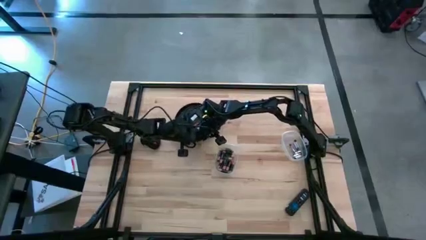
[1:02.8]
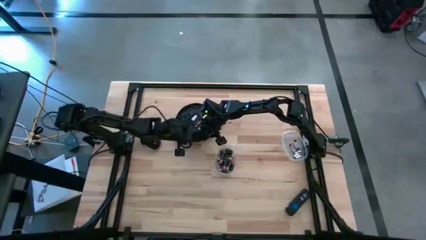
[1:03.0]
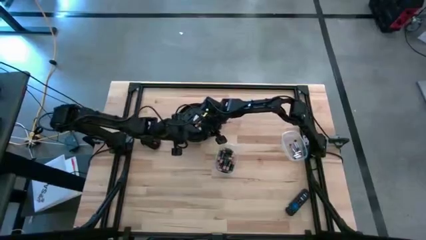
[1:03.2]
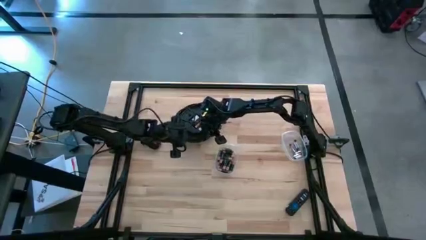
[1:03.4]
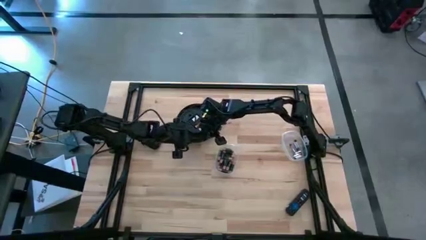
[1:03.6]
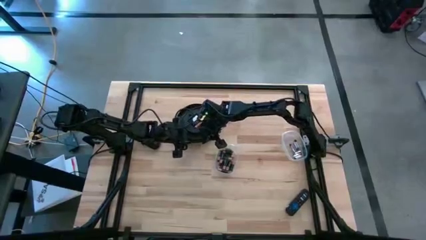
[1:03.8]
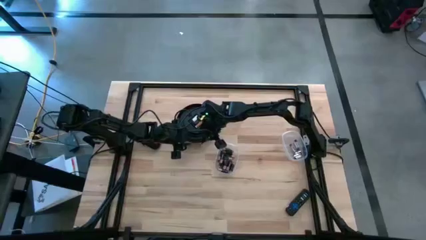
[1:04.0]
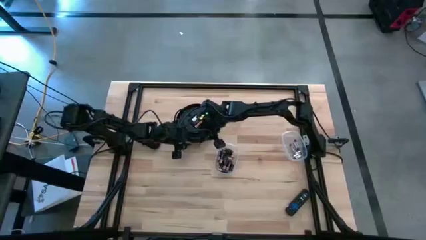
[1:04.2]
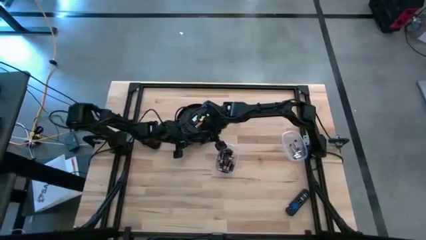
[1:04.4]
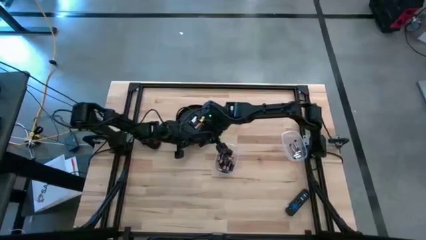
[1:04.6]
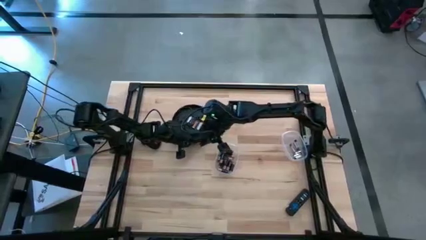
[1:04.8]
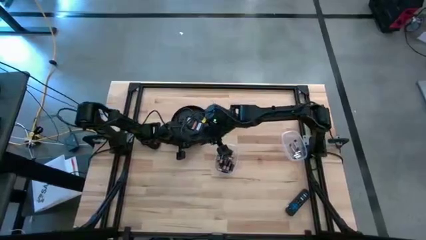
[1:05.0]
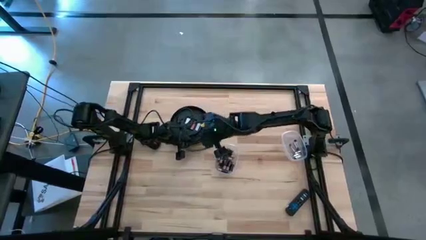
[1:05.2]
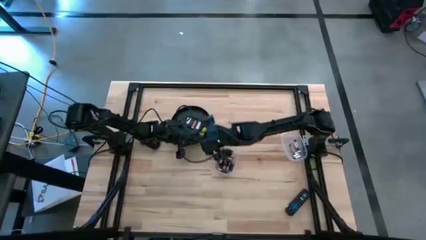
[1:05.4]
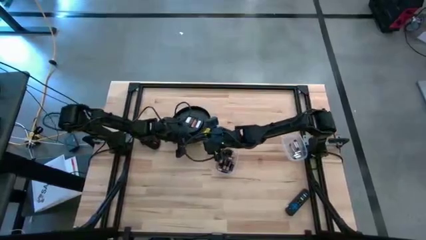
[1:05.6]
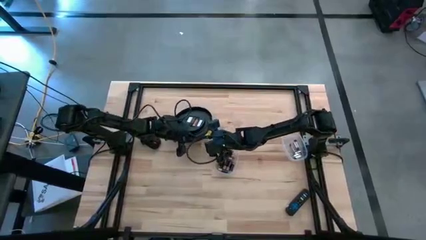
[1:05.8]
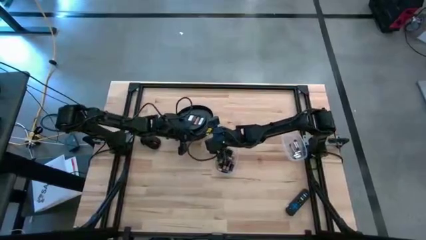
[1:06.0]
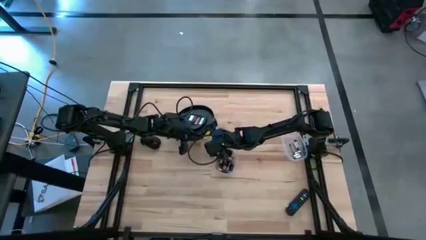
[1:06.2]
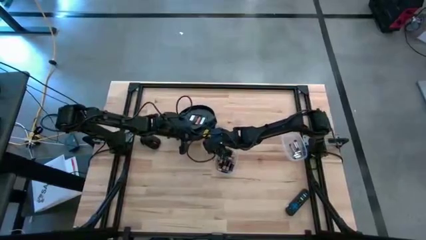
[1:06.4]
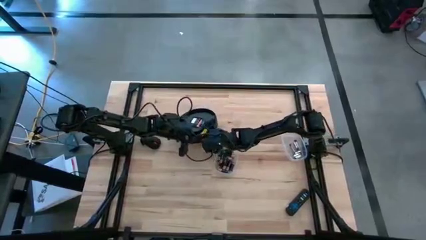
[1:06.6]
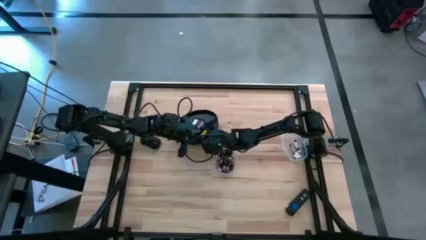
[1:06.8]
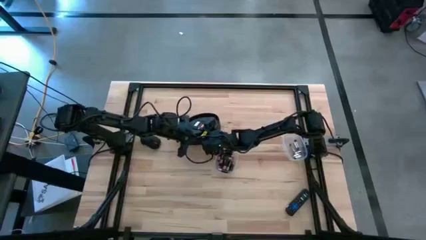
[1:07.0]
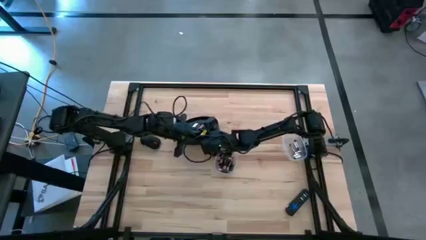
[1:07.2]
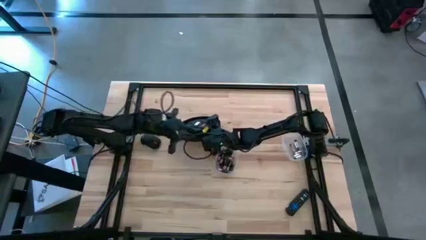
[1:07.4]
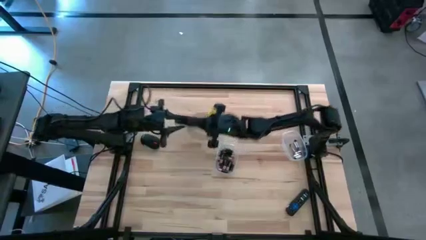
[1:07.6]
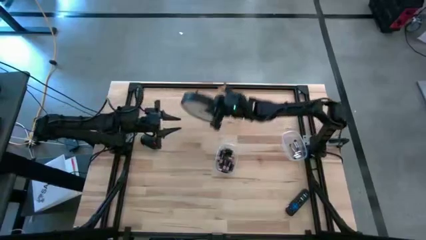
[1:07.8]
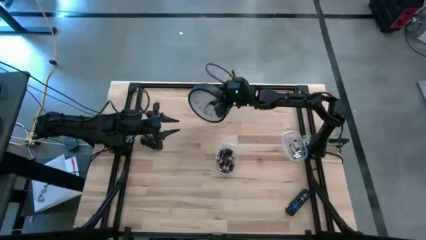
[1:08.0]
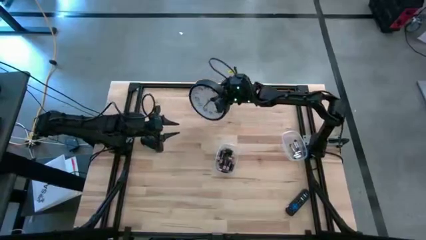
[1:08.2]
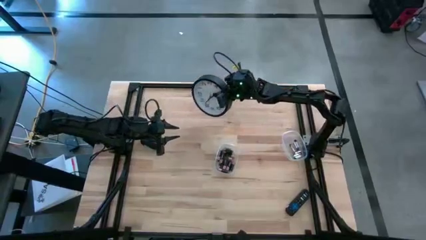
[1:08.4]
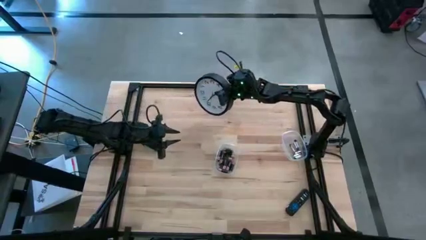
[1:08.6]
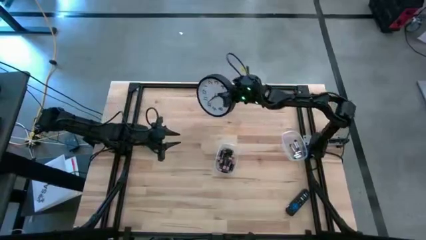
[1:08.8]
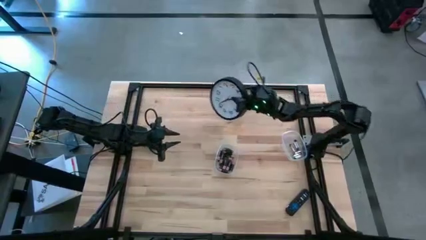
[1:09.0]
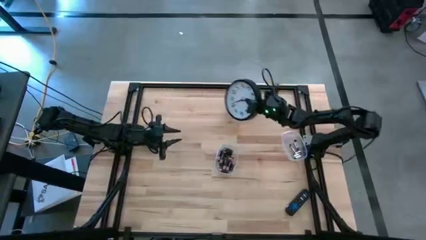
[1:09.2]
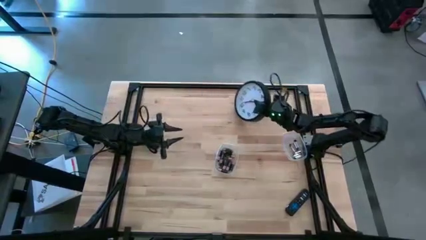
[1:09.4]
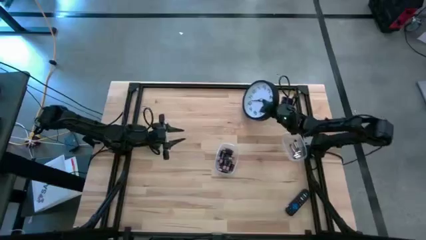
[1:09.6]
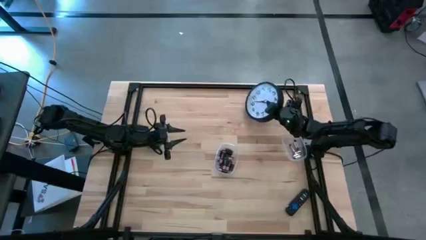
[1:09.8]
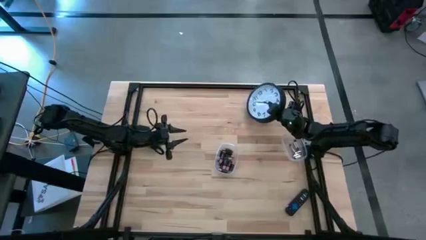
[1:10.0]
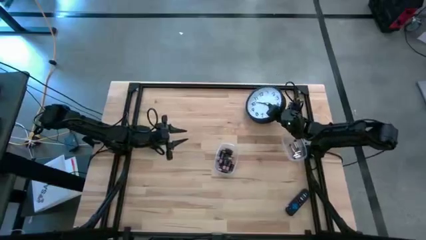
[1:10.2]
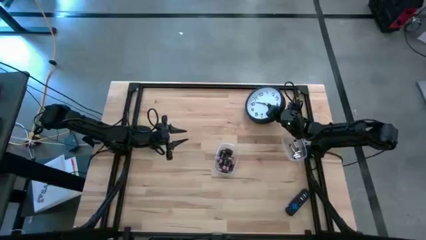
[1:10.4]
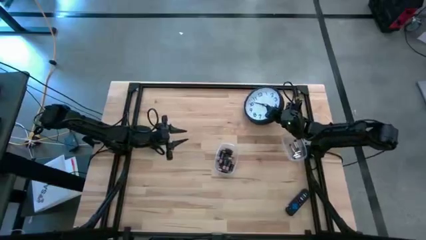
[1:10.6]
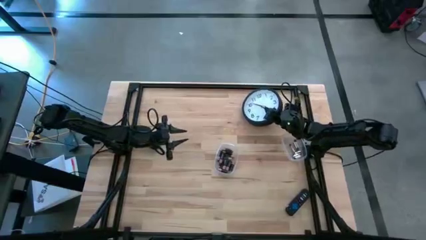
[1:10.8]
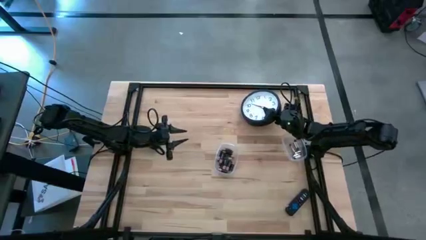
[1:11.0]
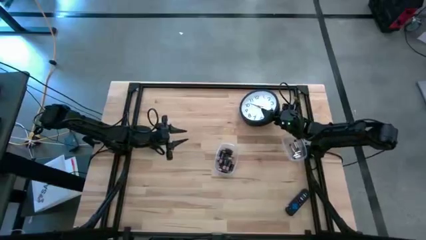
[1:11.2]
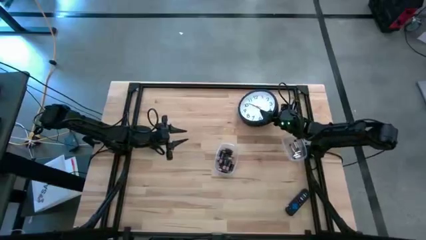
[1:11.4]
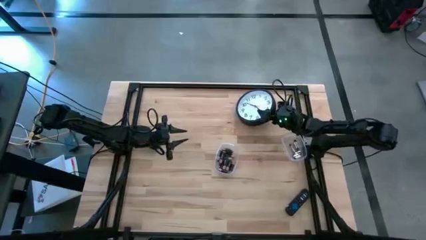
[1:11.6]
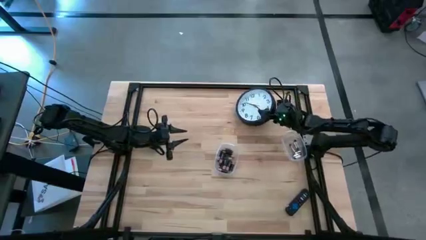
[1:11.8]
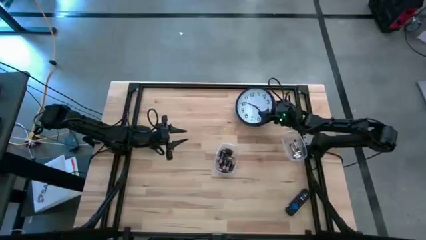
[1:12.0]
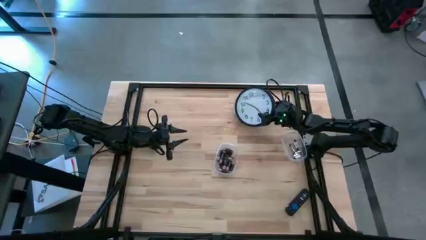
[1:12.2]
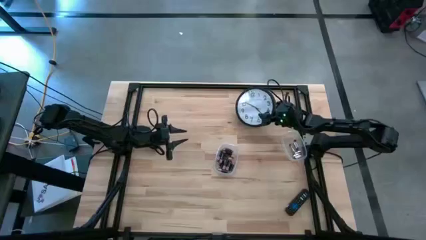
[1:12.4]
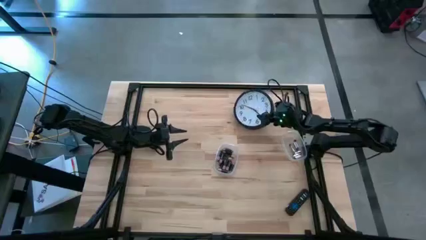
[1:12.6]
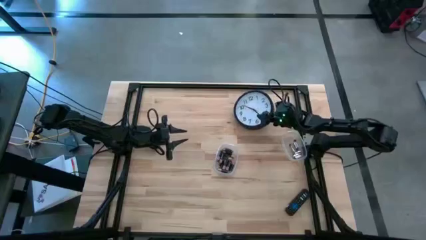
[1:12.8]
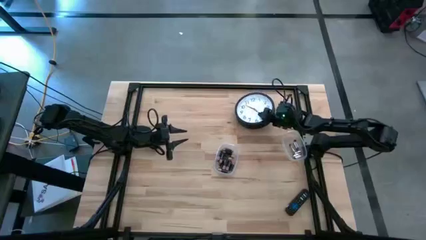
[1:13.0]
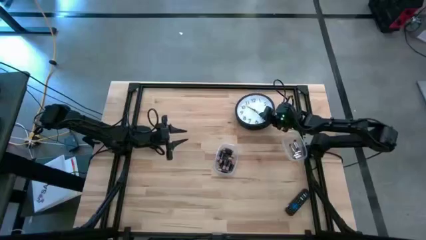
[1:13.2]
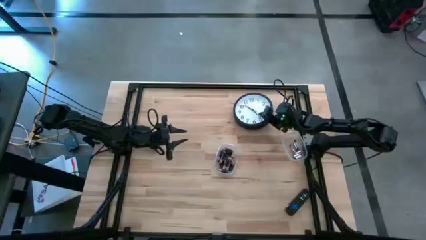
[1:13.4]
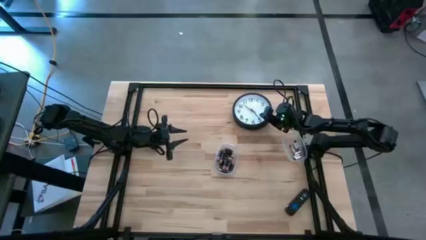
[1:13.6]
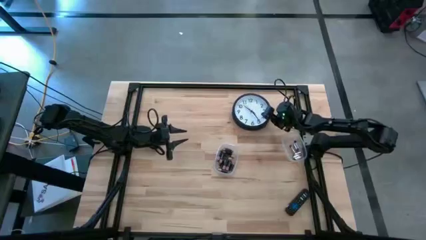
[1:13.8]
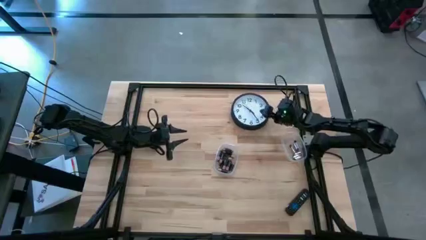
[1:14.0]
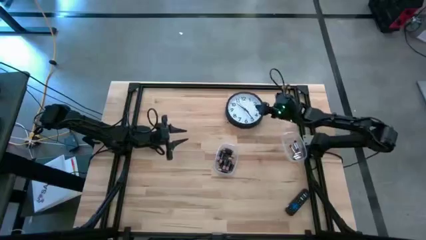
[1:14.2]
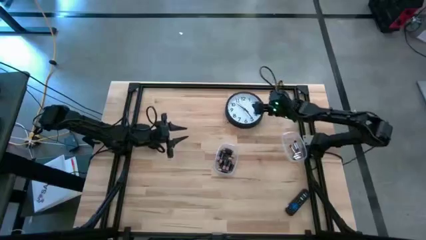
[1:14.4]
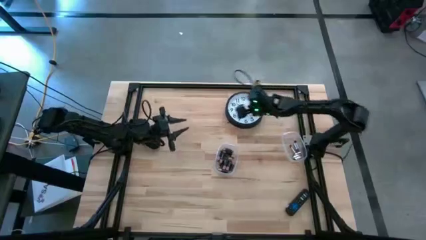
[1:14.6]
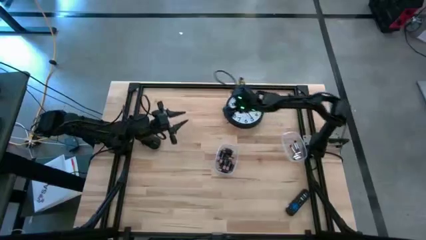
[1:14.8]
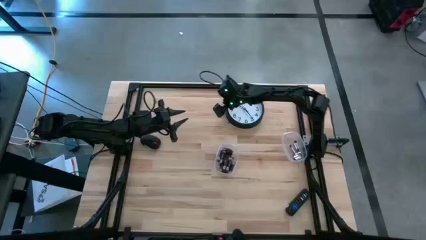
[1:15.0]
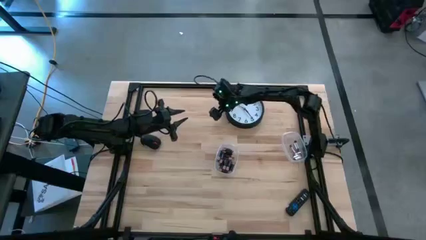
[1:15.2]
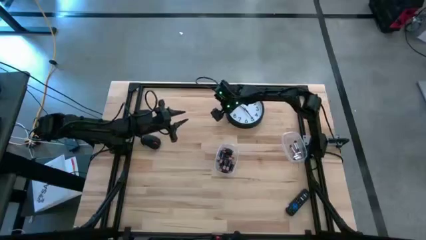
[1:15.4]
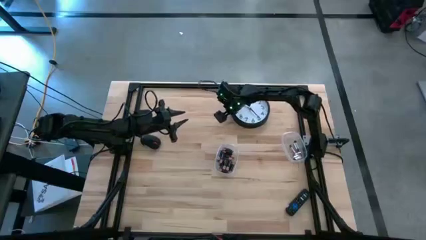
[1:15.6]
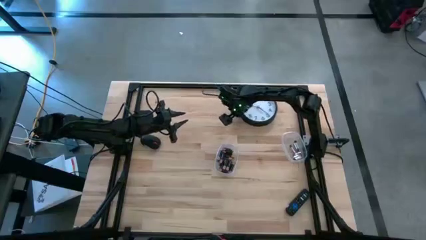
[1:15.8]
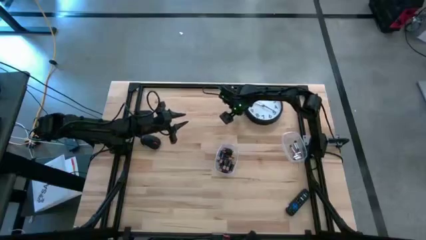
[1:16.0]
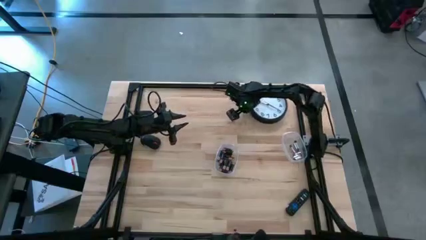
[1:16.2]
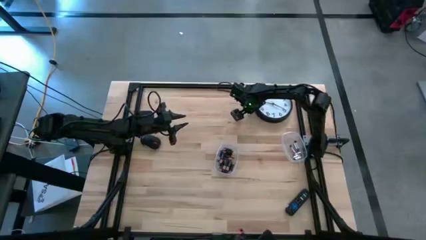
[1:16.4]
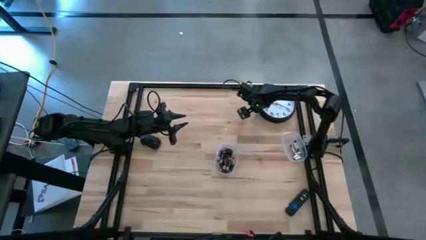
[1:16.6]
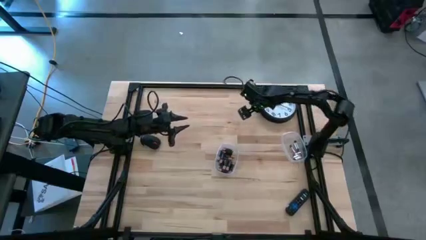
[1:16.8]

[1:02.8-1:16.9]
Task: Insert battery
Move the wall clock

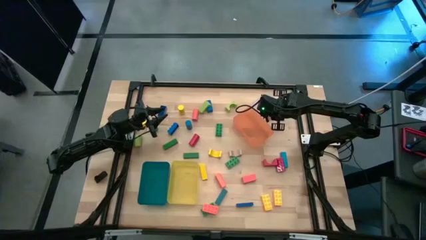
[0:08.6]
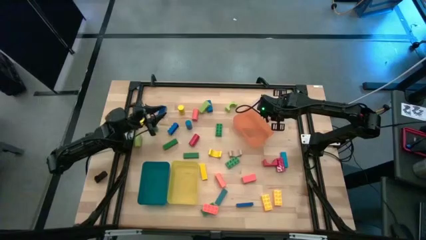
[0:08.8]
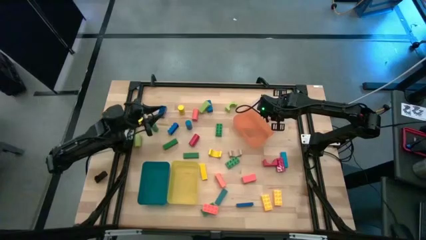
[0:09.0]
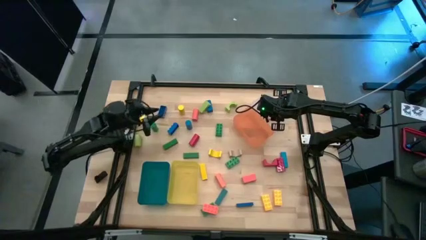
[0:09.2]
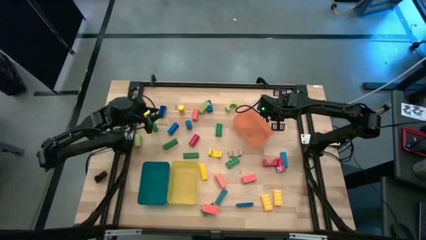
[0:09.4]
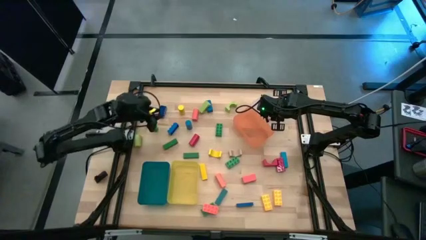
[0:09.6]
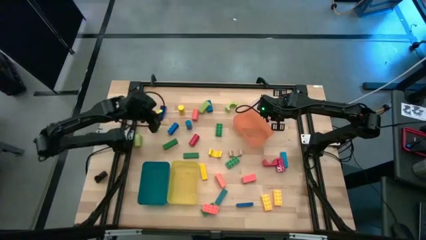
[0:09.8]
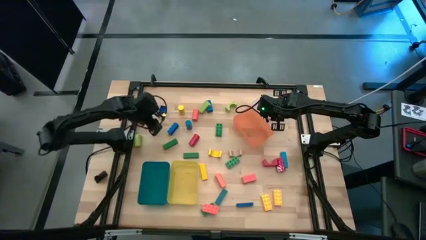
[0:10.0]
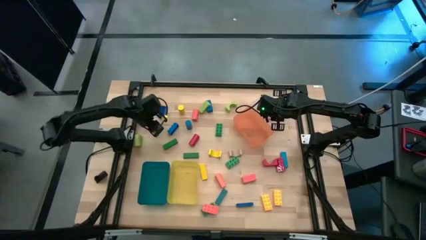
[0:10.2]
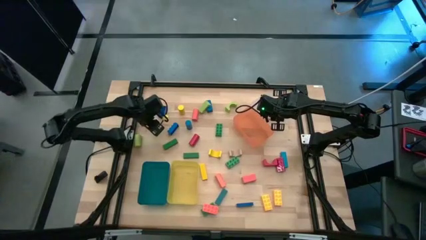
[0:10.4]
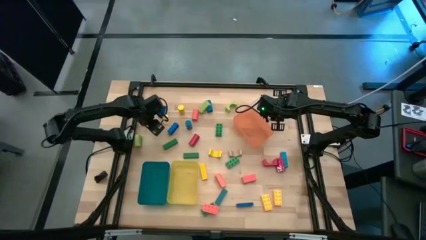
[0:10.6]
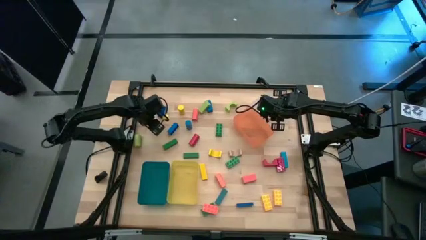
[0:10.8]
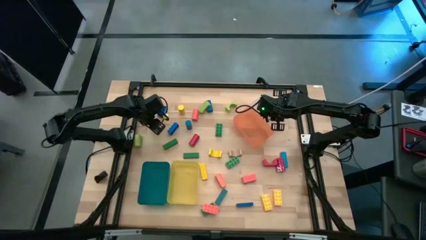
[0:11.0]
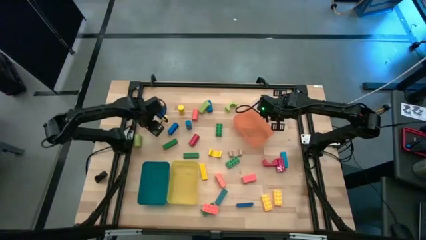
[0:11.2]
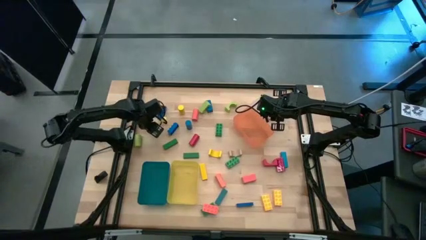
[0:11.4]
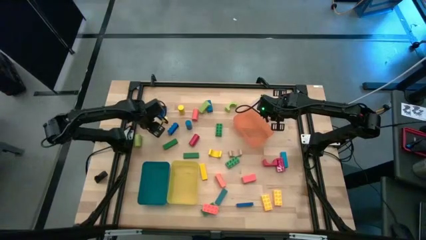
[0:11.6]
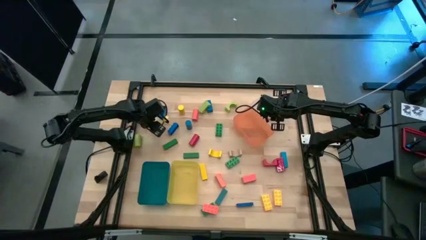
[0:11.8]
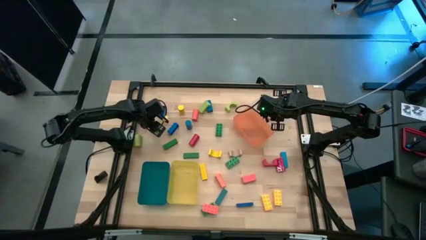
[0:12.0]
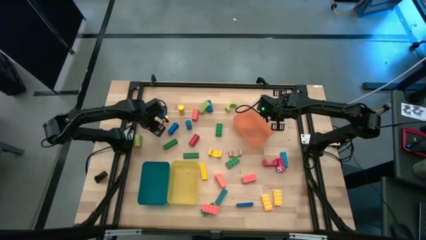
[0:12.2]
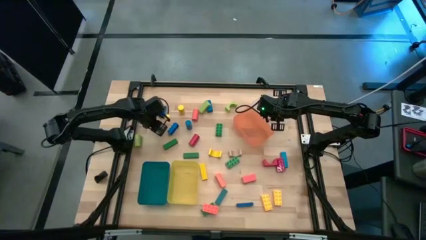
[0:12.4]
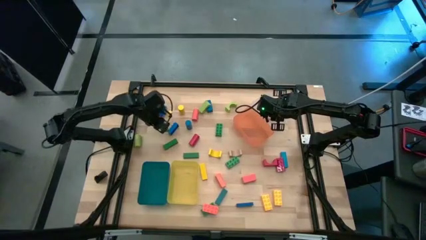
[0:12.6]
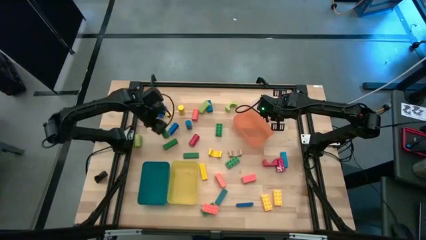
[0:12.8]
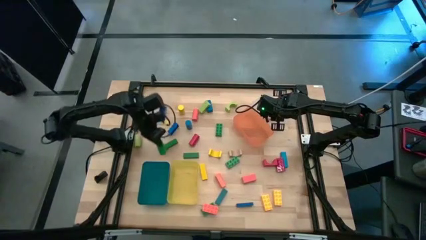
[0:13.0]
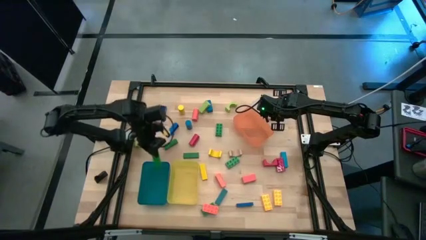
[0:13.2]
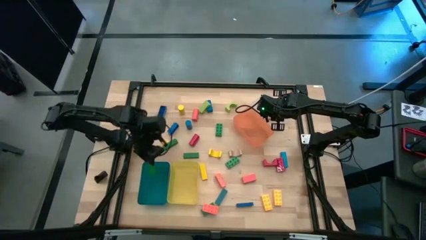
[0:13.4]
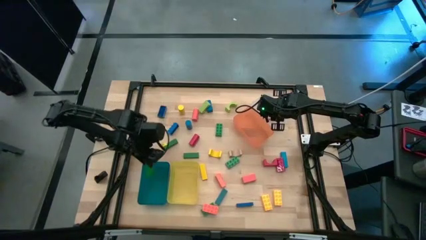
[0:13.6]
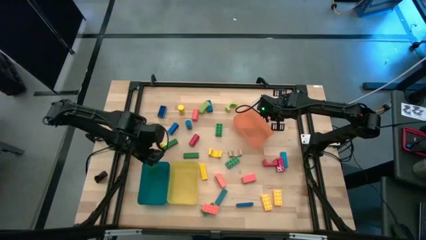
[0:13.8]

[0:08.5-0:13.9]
Task: Sort blocks by size
Put the green cylinder block into the blue bin
